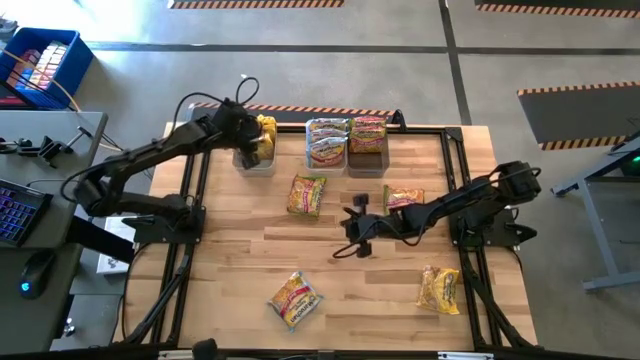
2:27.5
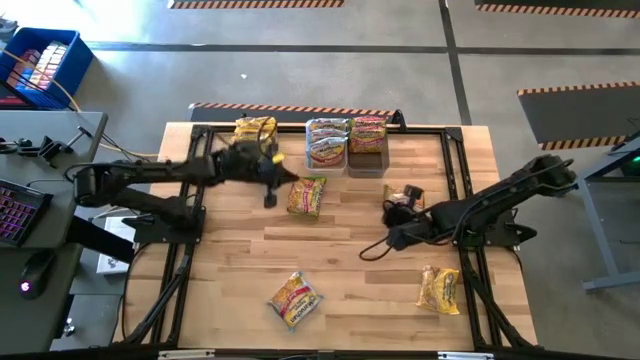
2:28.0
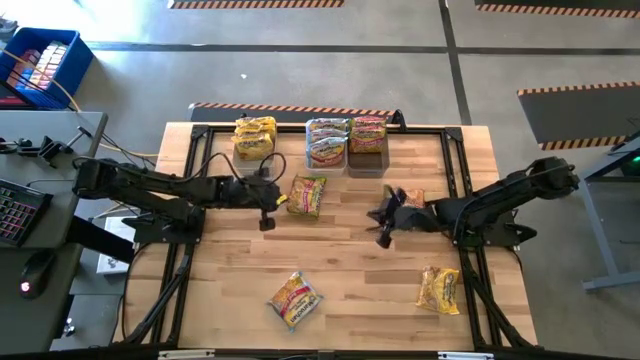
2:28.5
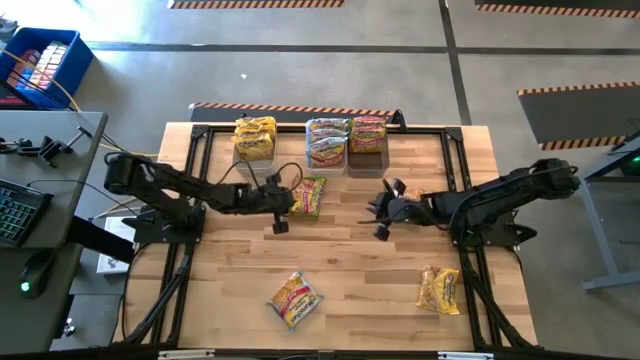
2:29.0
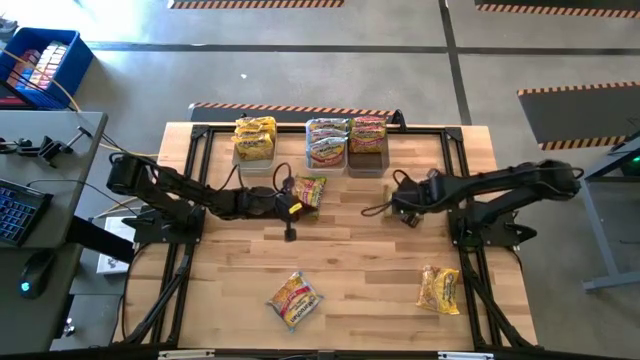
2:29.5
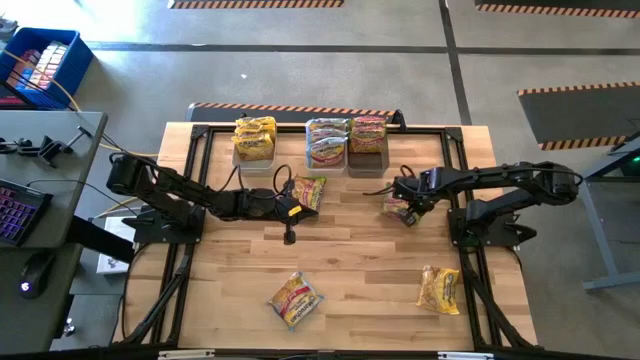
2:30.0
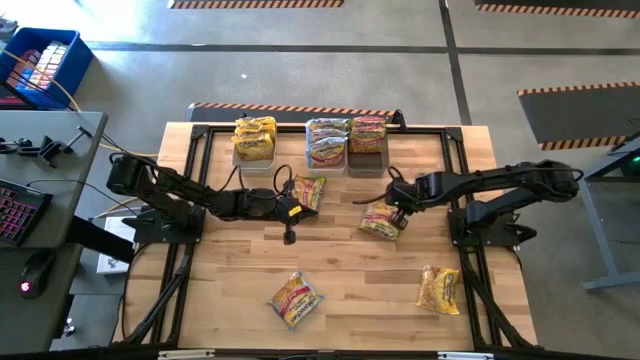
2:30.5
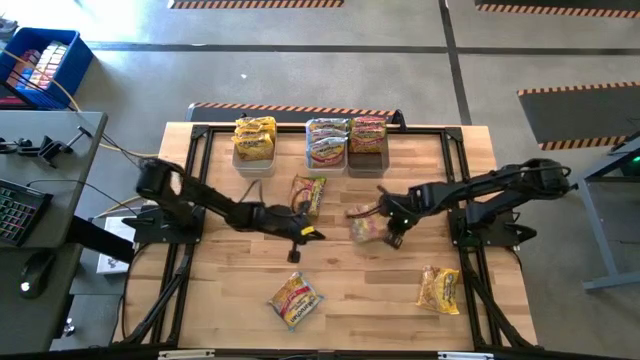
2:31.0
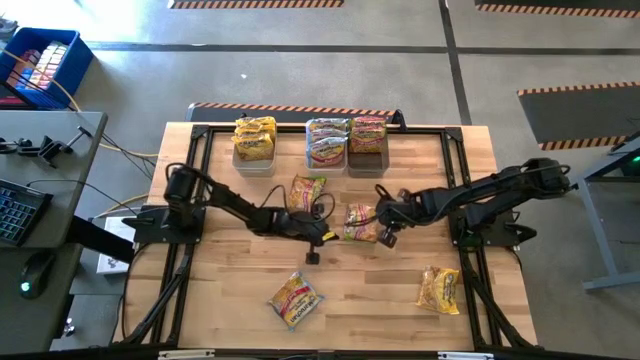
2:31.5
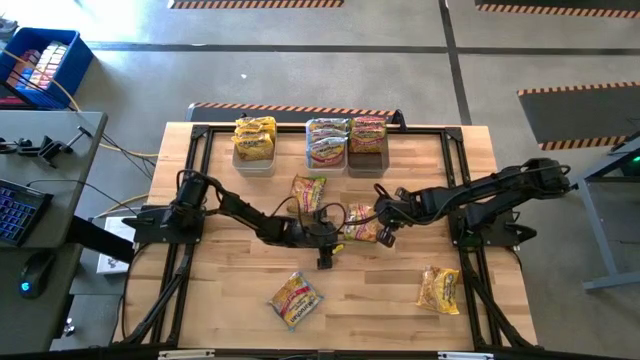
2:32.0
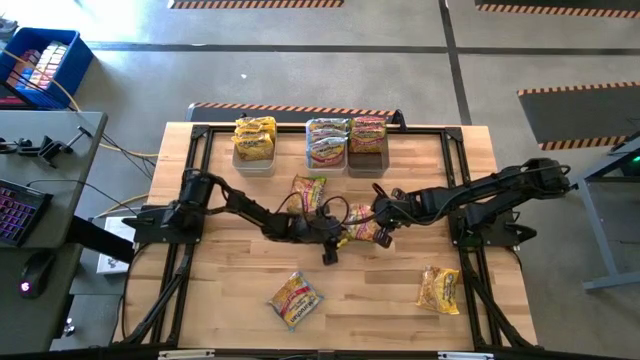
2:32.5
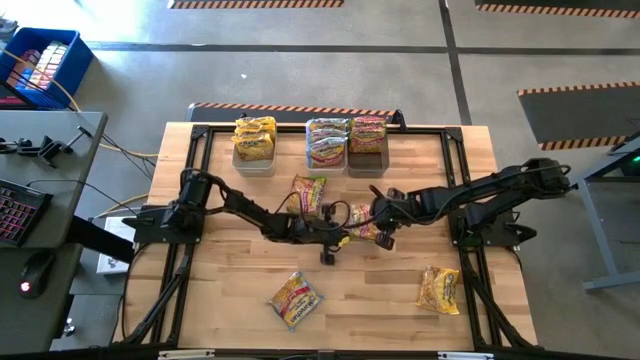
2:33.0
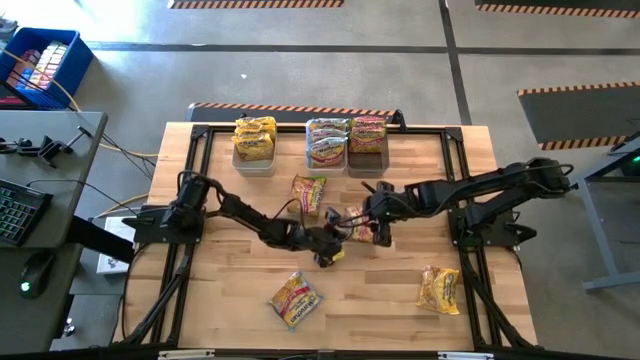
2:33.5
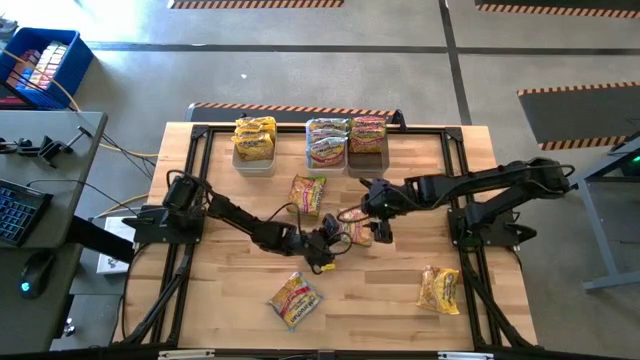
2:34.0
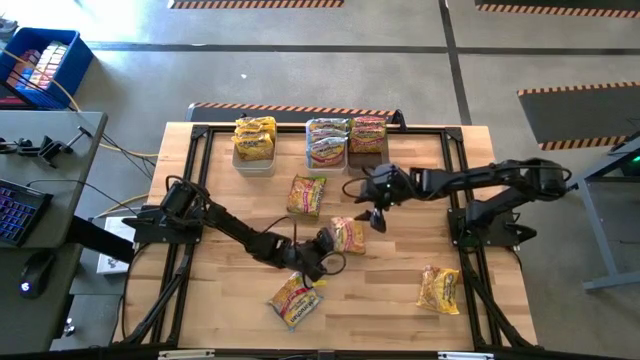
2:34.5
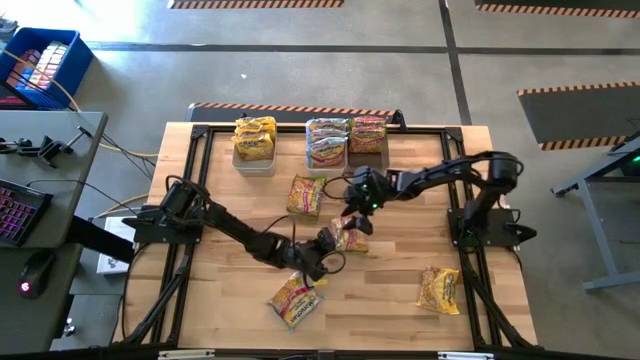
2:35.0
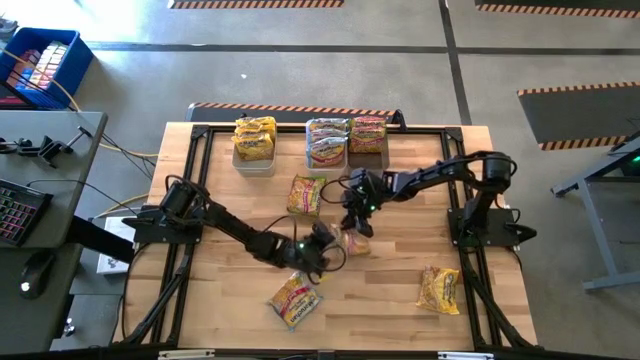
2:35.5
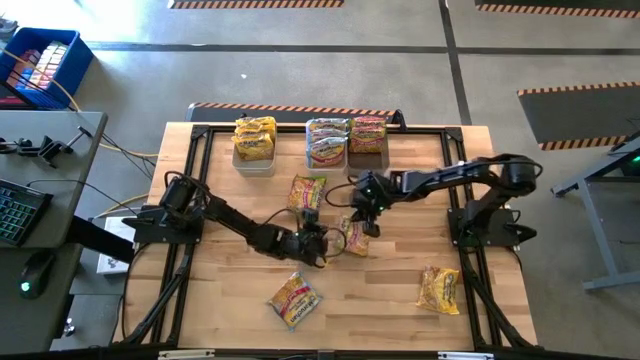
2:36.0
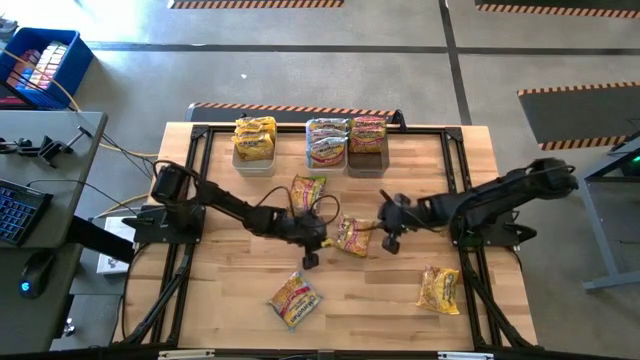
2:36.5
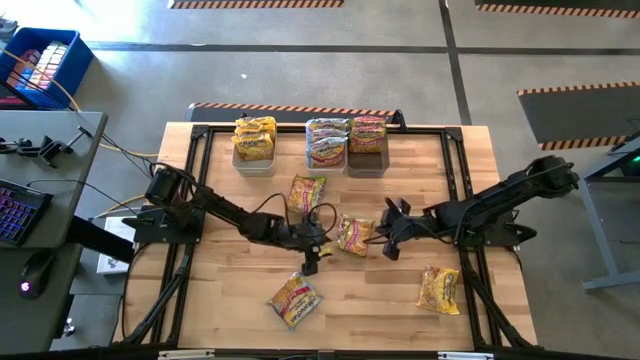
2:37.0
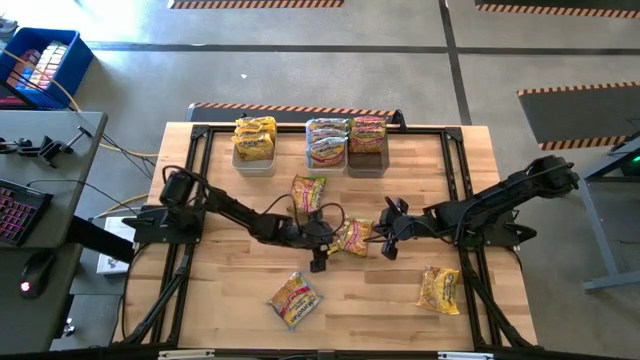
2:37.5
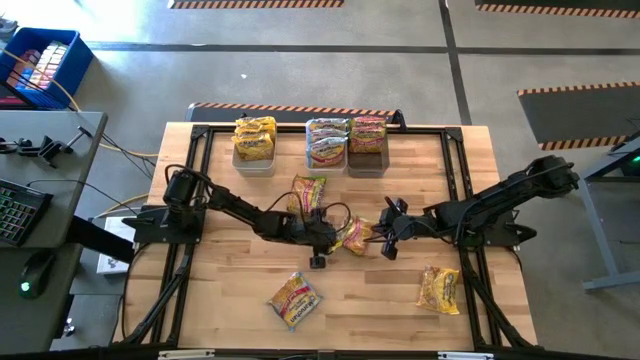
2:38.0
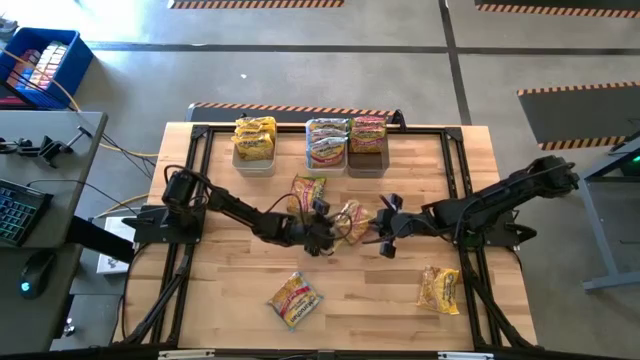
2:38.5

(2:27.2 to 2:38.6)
Task: Sort Maruchan noodles
Put the top right green noodle pack into the transparent black bin

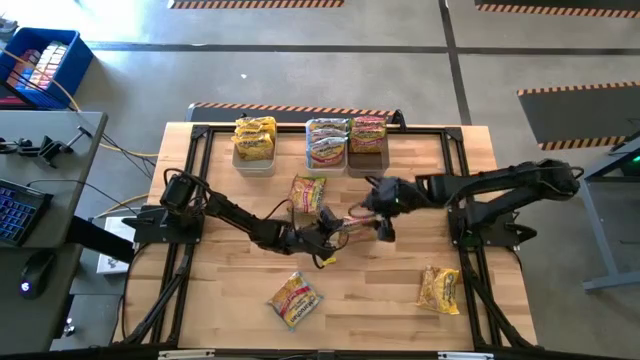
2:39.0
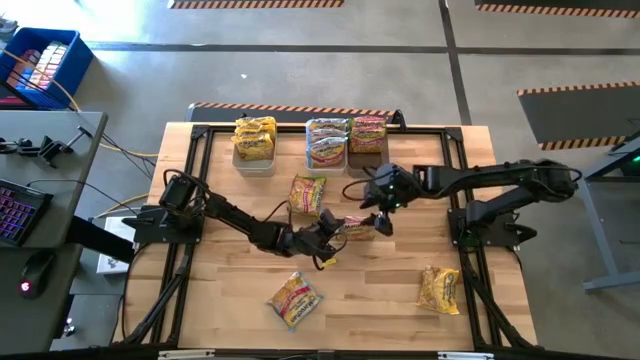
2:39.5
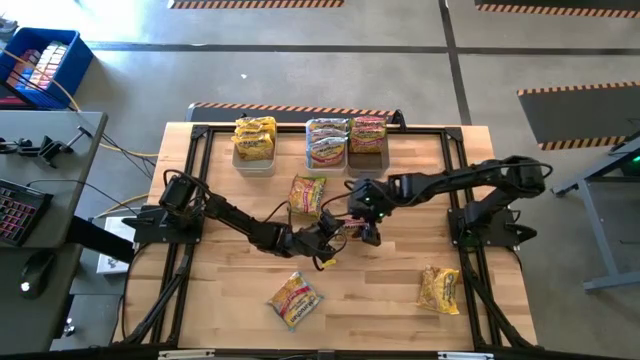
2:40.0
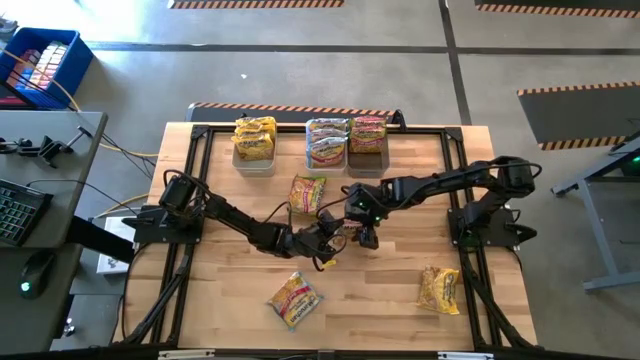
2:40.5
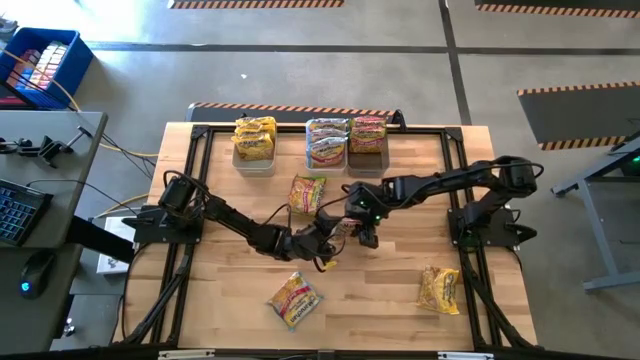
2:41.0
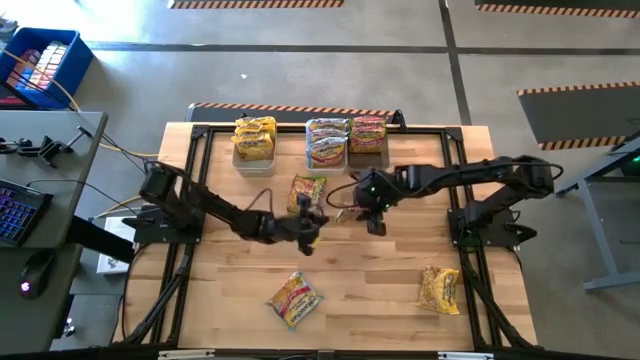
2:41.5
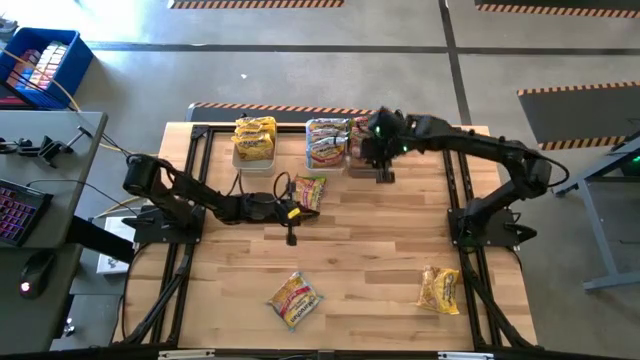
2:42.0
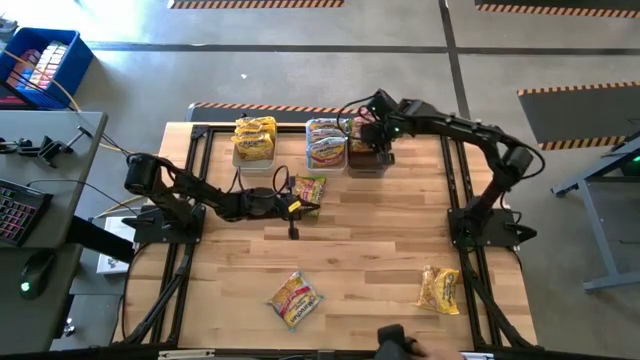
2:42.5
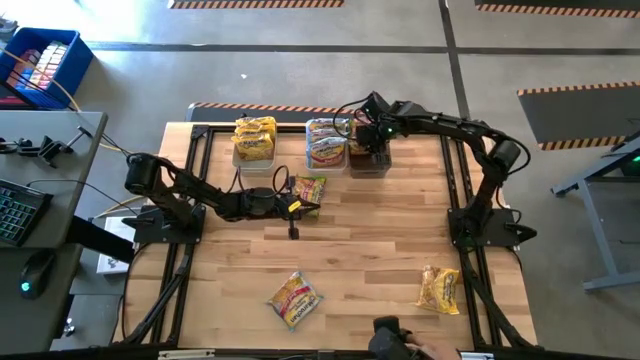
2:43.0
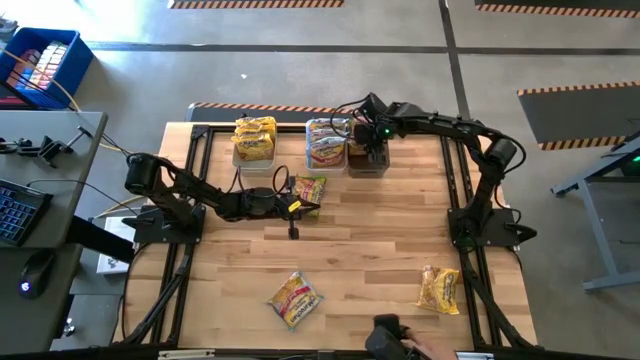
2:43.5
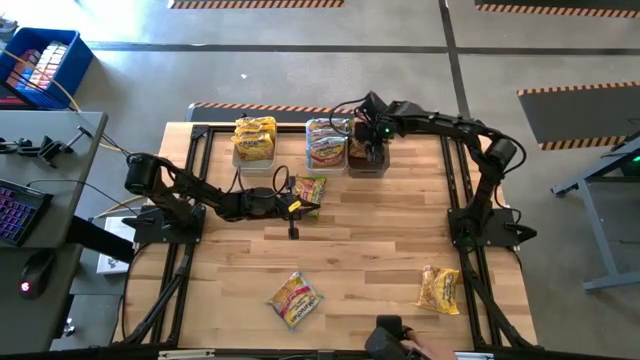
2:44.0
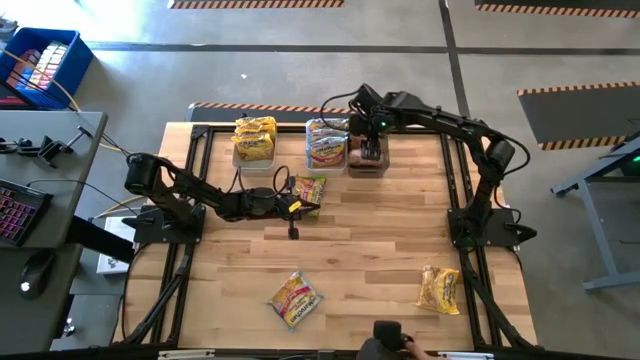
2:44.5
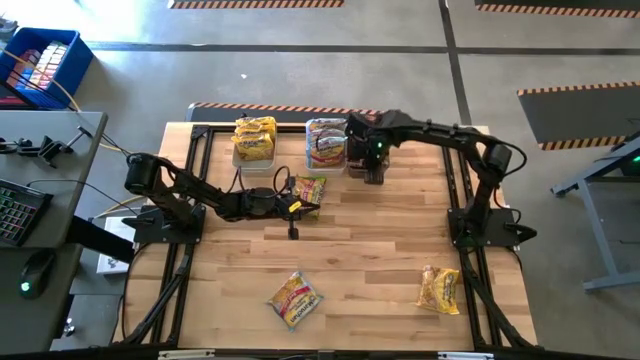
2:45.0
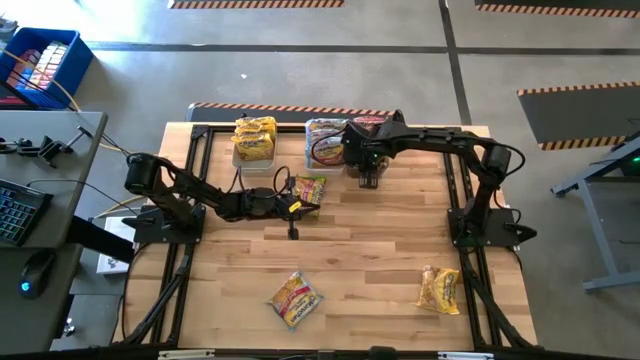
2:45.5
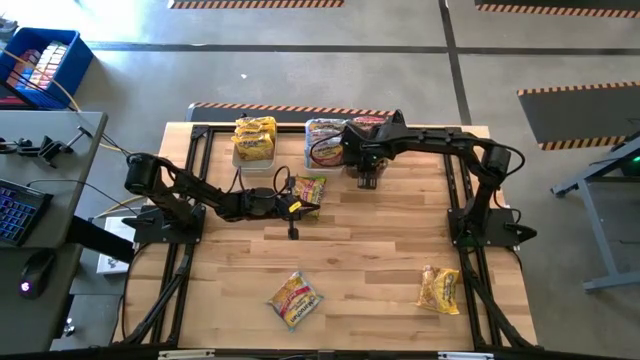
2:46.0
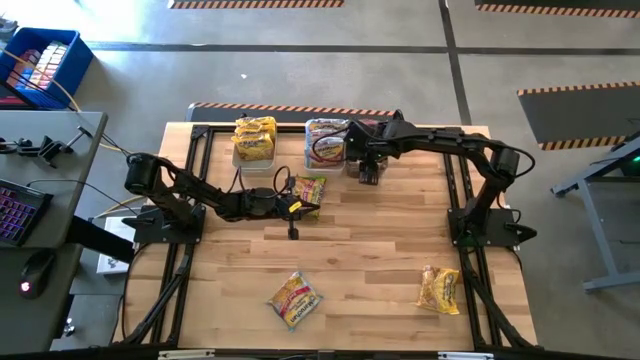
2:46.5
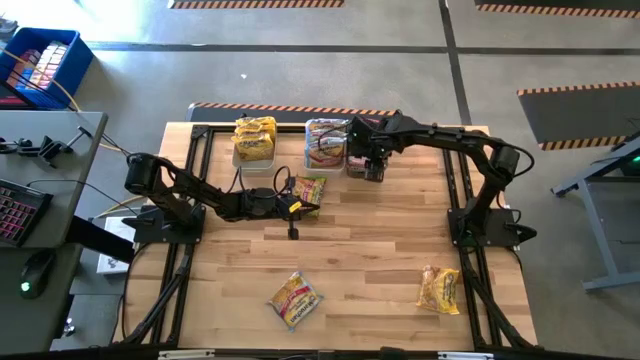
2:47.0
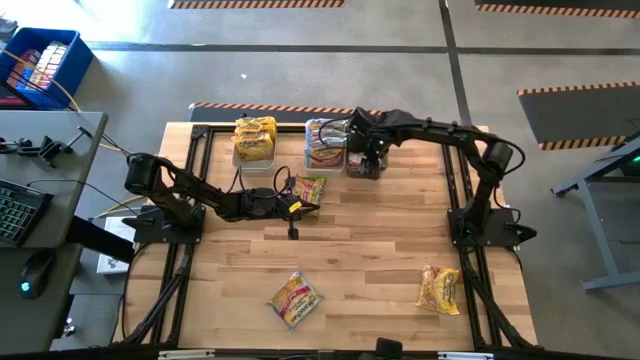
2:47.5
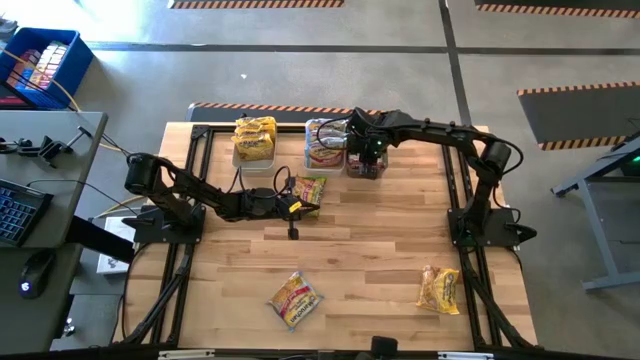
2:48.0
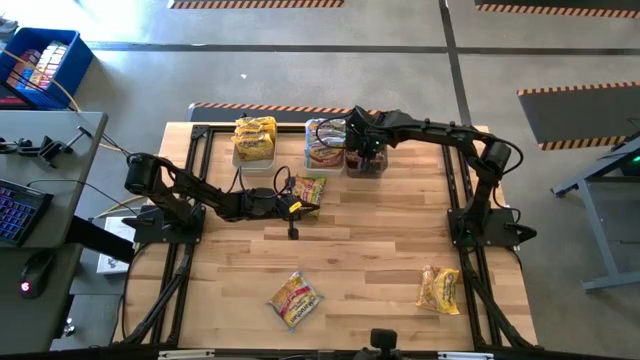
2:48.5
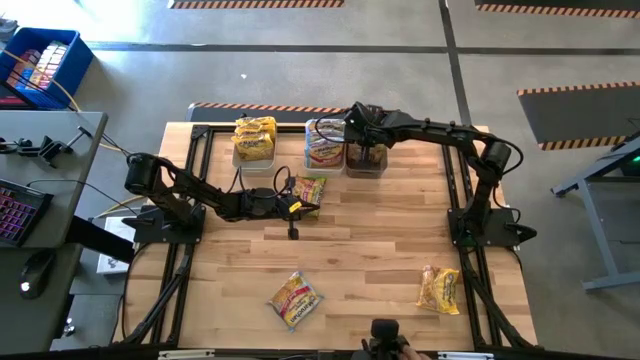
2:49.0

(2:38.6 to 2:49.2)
Put the top right green noodle pack into the transparent black bin
